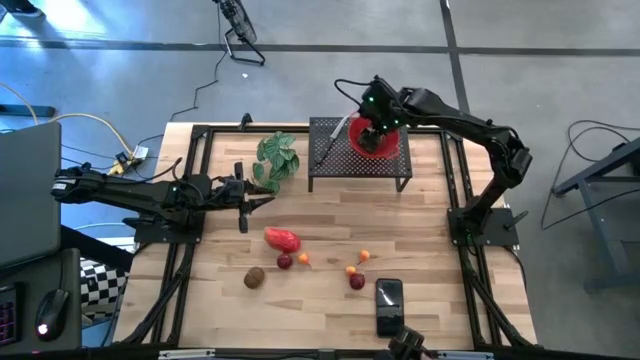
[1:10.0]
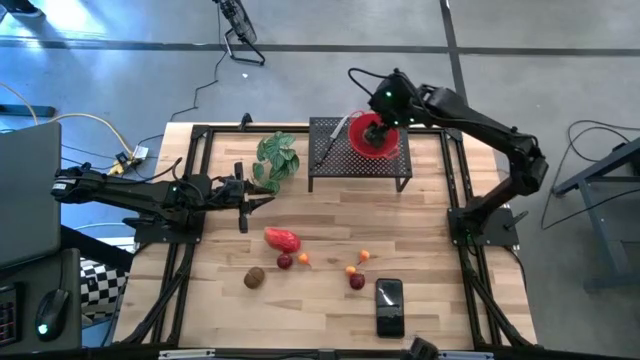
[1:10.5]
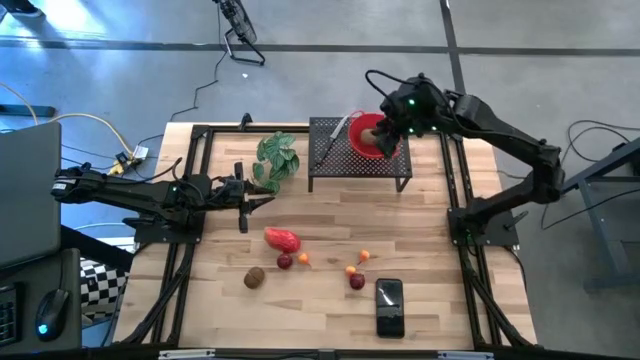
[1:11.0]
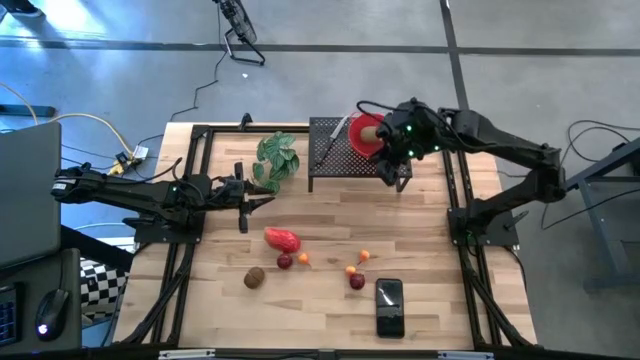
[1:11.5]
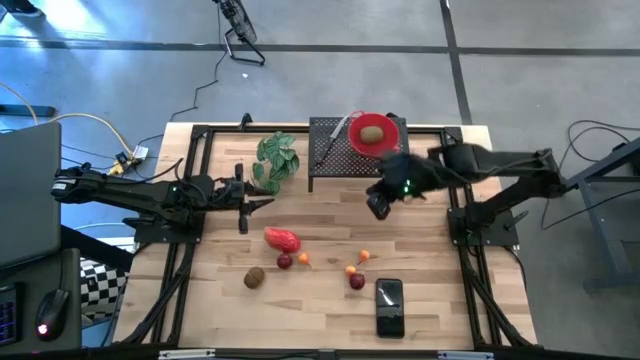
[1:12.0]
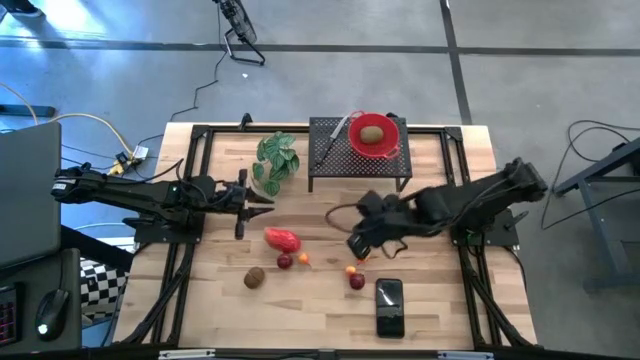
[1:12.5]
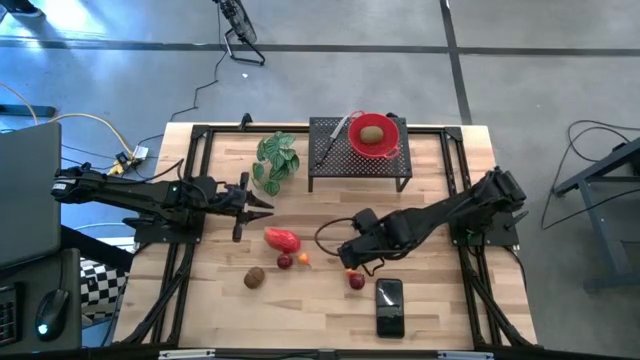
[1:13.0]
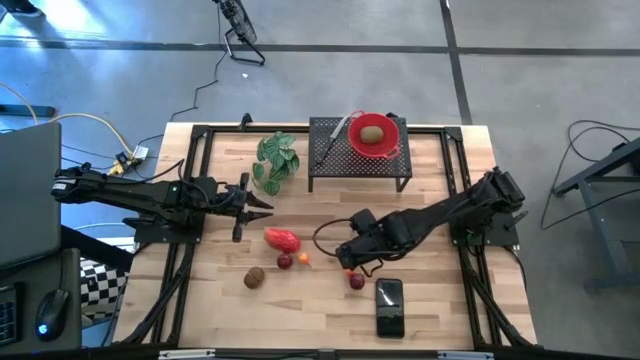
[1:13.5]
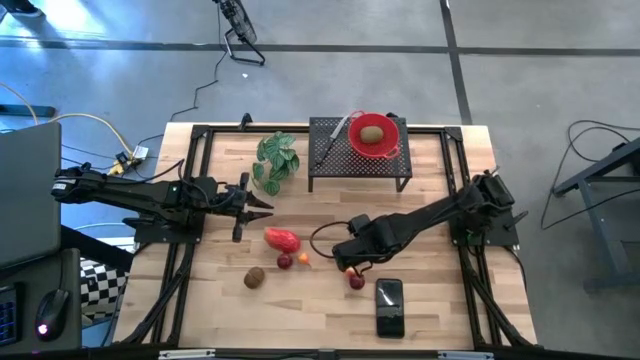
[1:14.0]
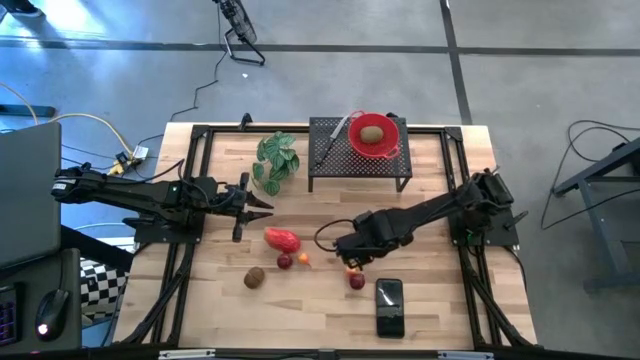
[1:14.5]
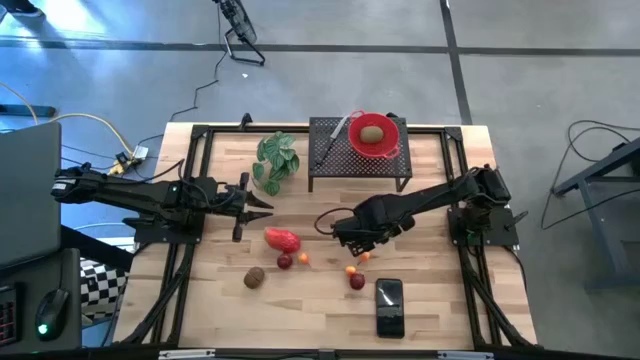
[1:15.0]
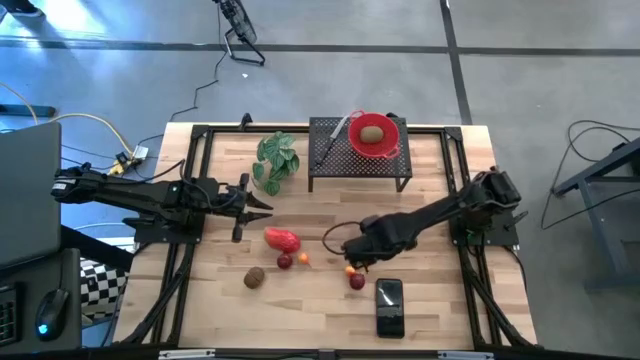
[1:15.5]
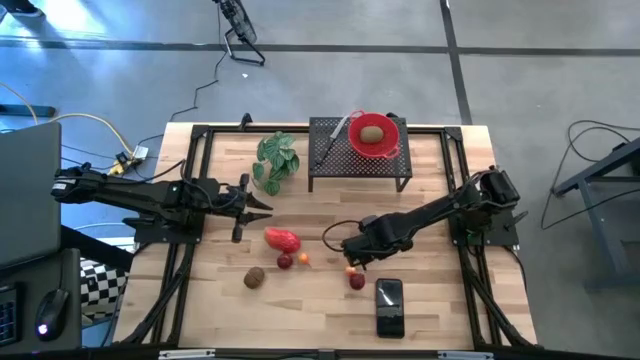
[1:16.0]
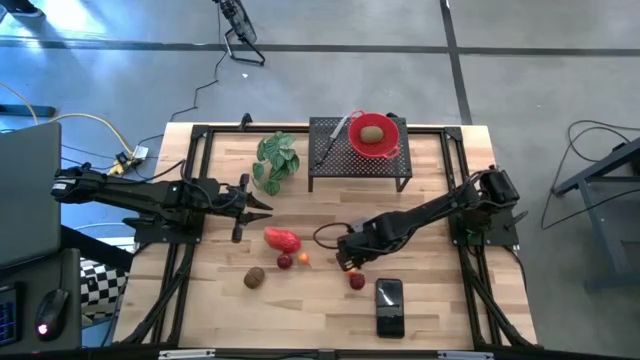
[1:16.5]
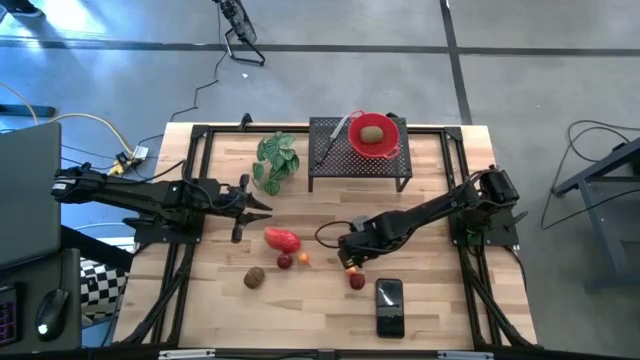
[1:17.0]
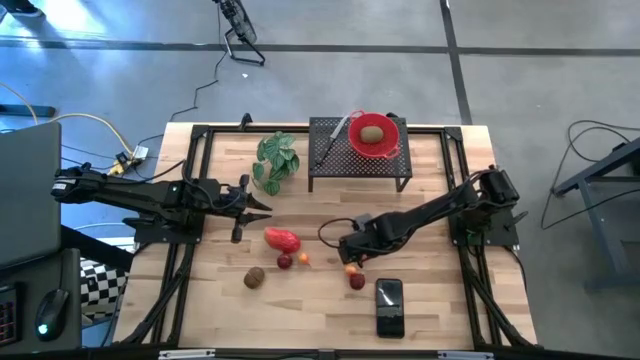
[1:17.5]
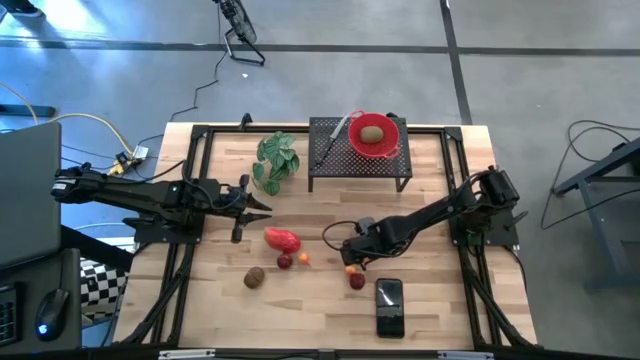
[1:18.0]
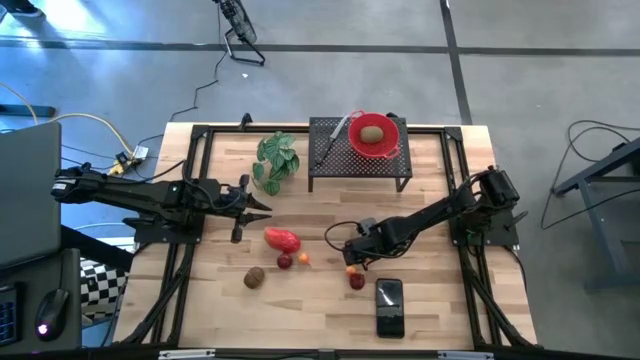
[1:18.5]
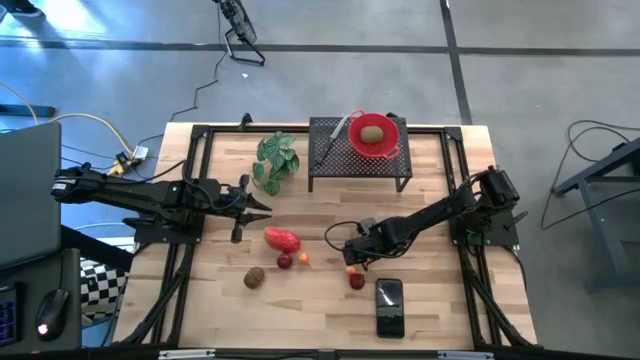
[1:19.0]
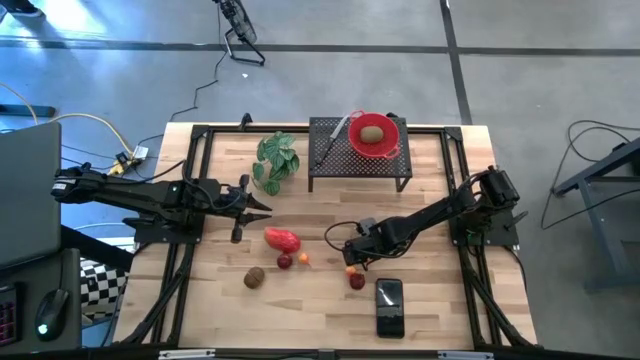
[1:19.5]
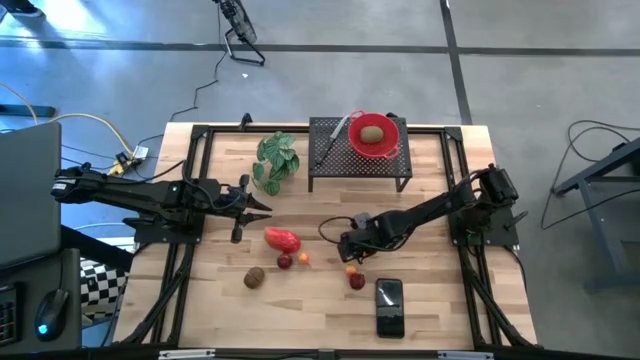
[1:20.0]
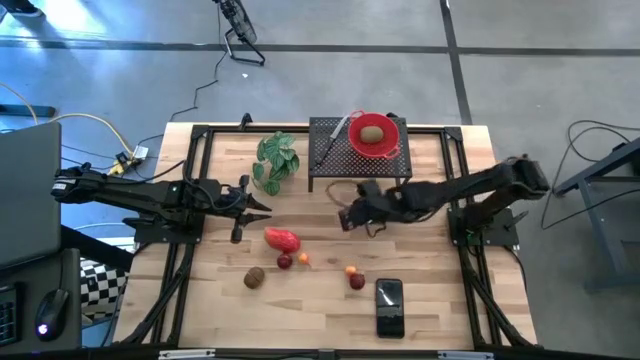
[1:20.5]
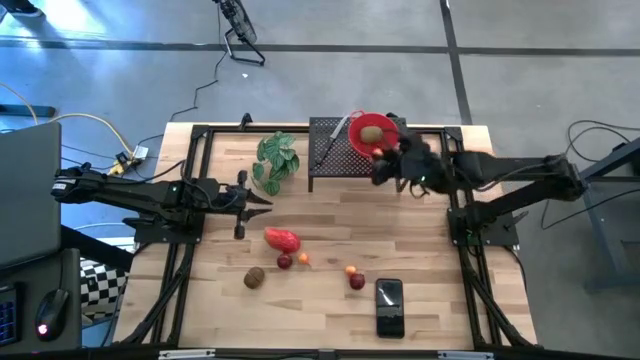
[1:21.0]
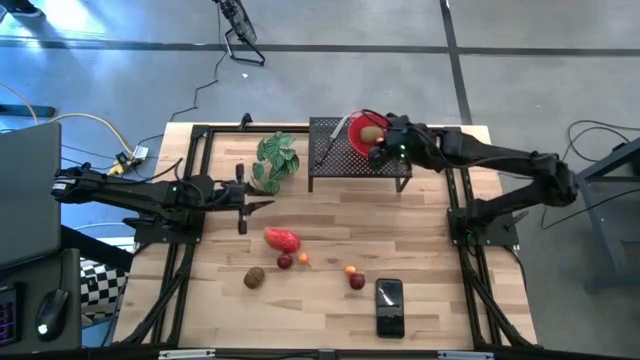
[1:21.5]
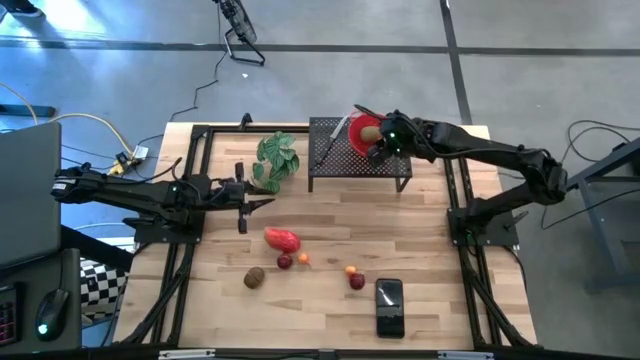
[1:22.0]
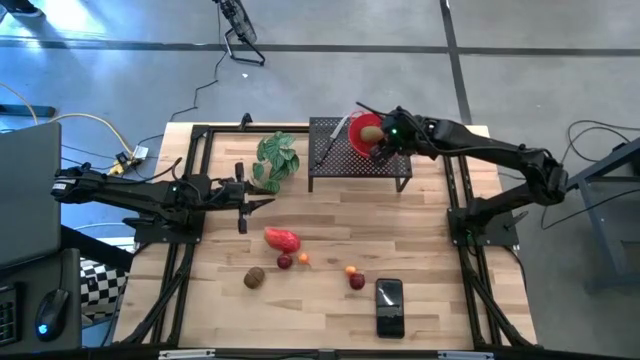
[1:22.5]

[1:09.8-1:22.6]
Task: Pick & Place Fruit
Put the right yellow pear into the red strainer bowl on the shelf
